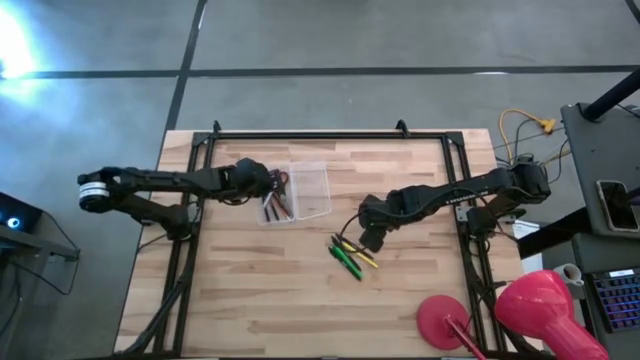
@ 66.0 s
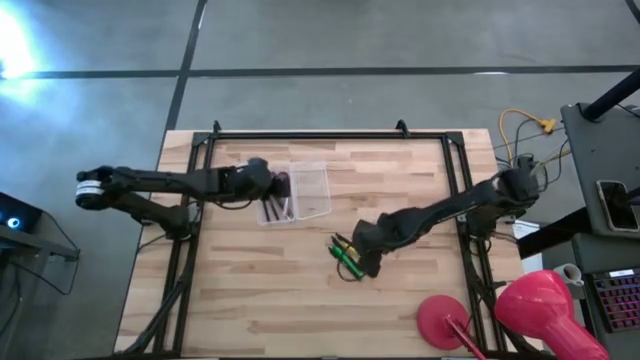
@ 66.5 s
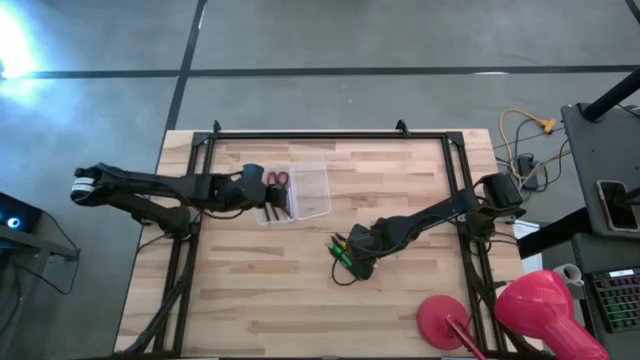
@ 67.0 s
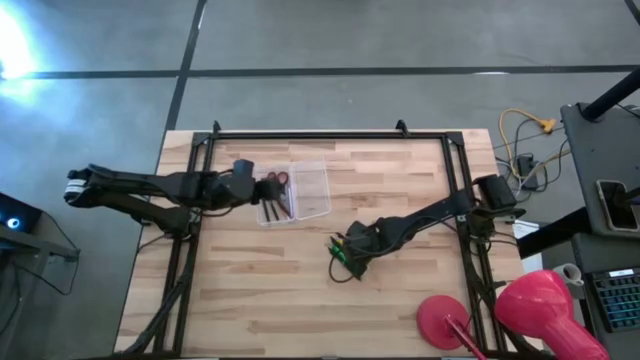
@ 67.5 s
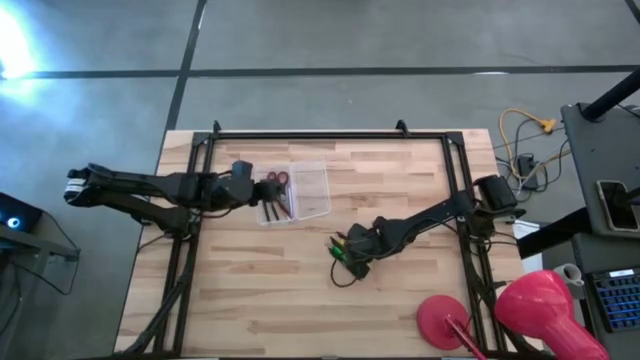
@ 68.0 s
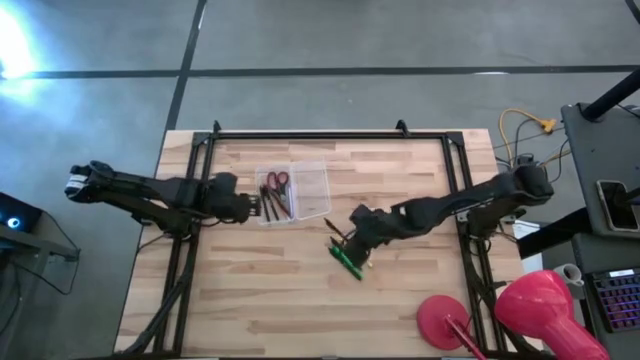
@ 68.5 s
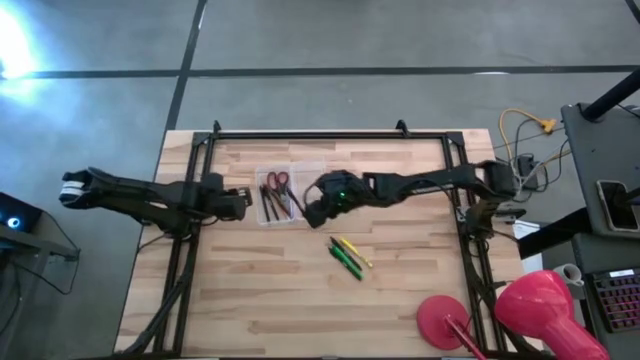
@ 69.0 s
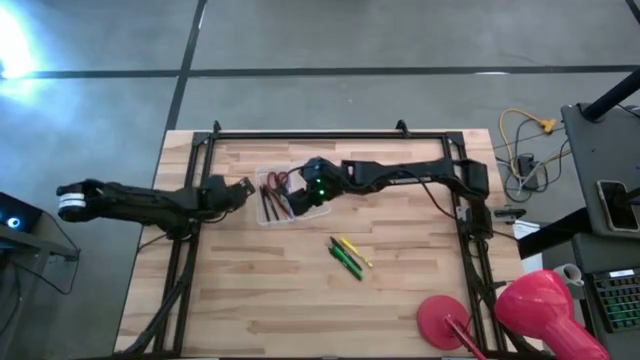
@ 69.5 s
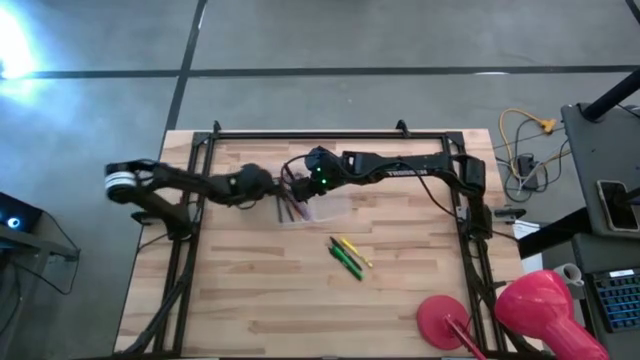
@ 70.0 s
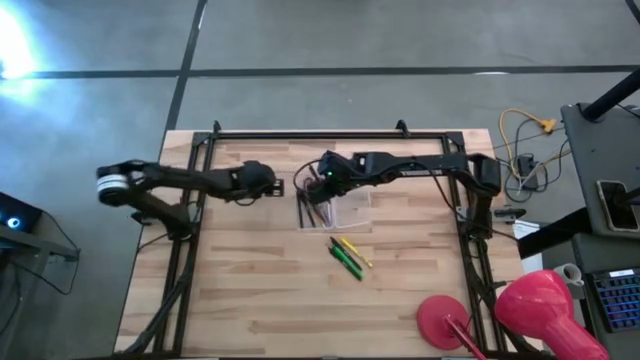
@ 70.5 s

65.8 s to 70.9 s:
Task: Pick & place school supplies into a supply box
Put the black pen into the transparent supply box

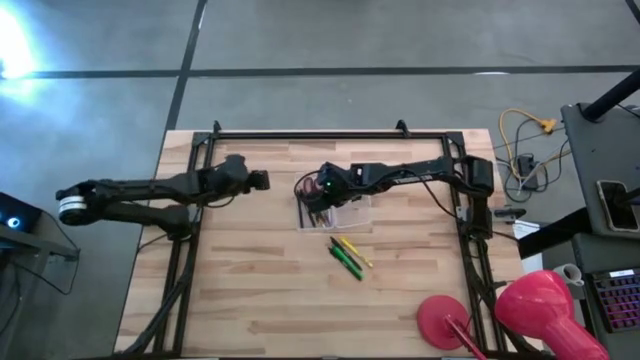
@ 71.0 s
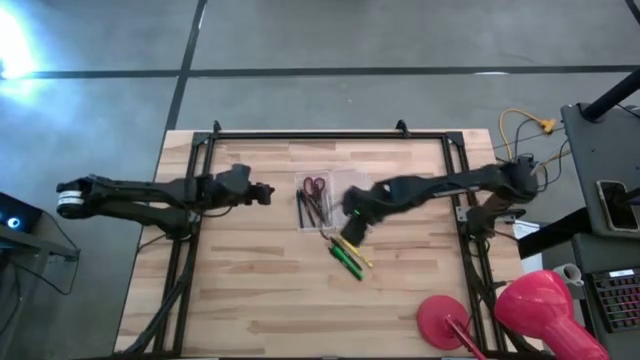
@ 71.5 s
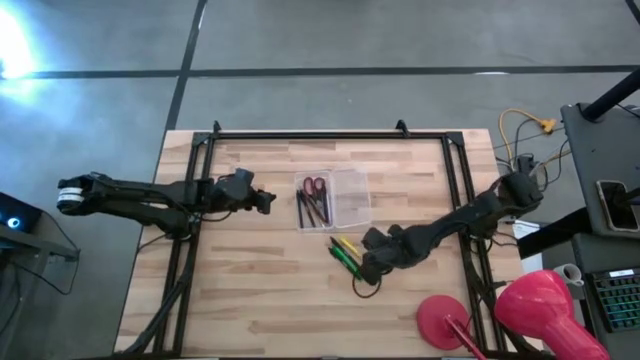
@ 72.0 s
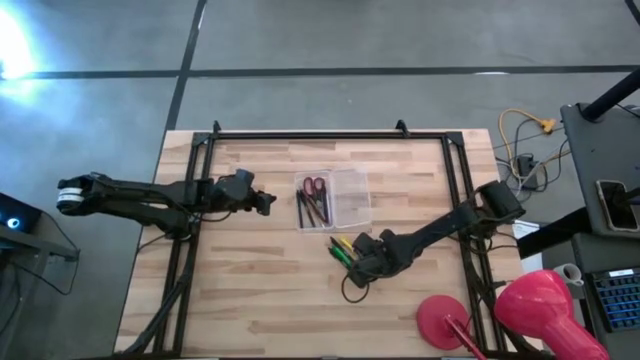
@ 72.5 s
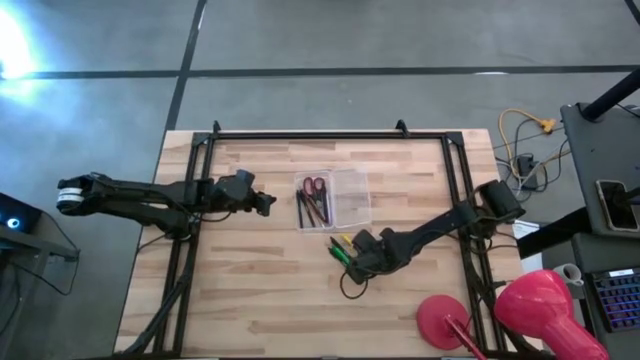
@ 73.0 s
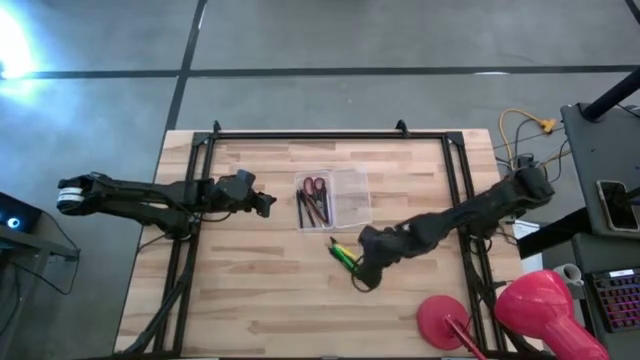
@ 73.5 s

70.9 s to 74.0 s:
Put the yellow pen into the transparent supply box

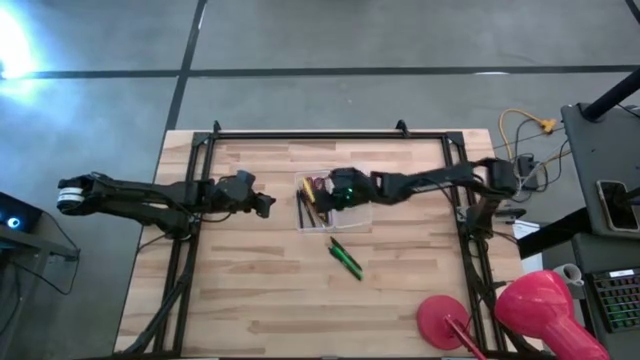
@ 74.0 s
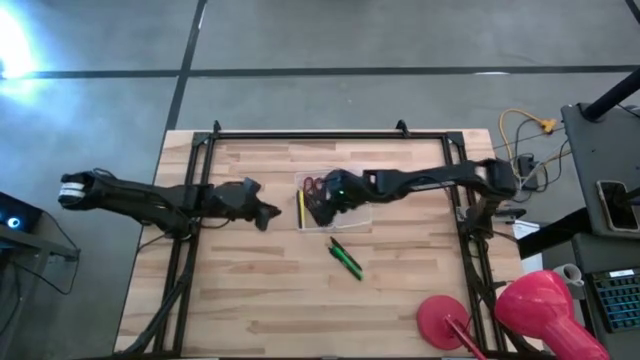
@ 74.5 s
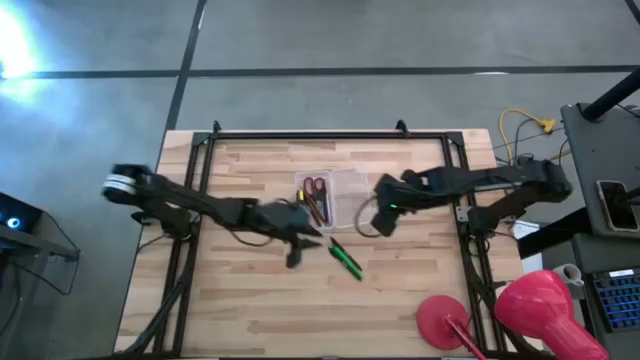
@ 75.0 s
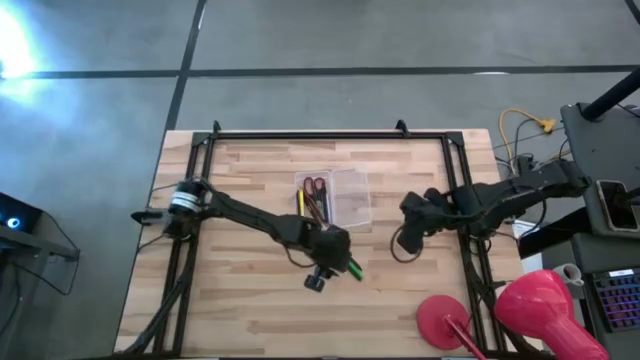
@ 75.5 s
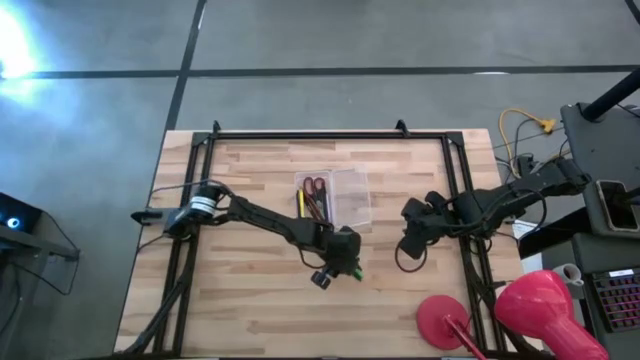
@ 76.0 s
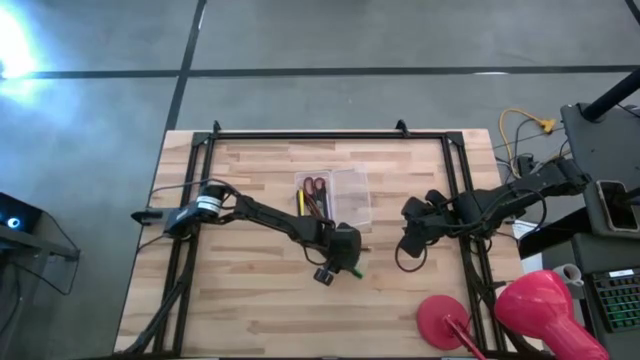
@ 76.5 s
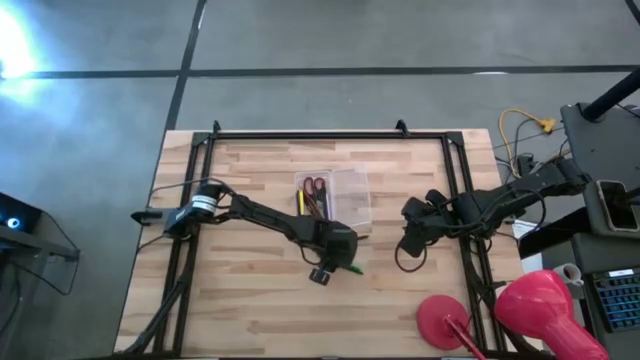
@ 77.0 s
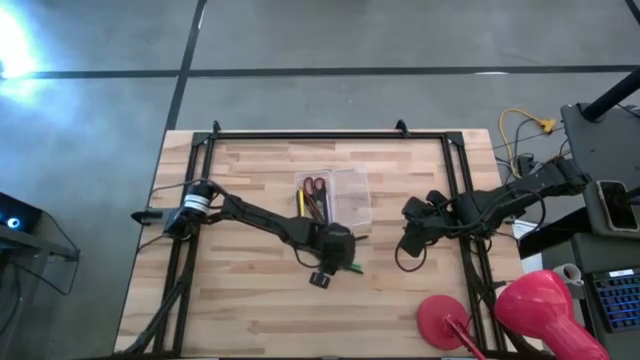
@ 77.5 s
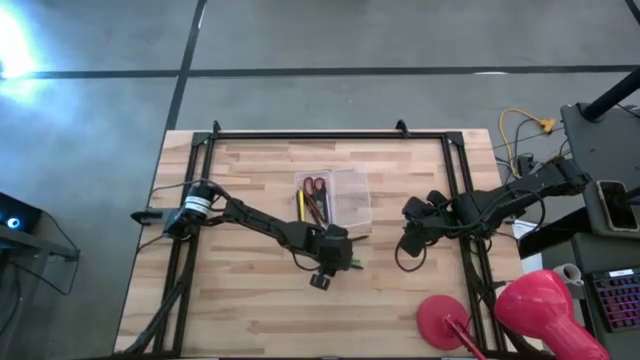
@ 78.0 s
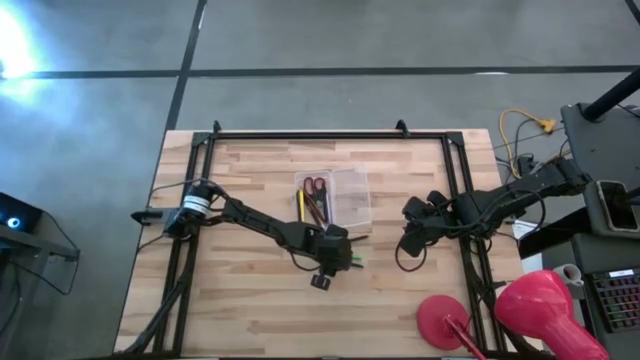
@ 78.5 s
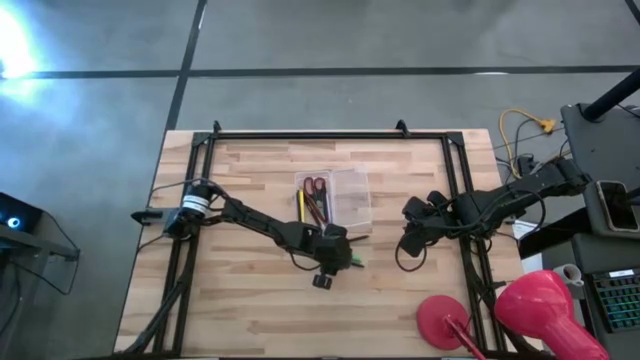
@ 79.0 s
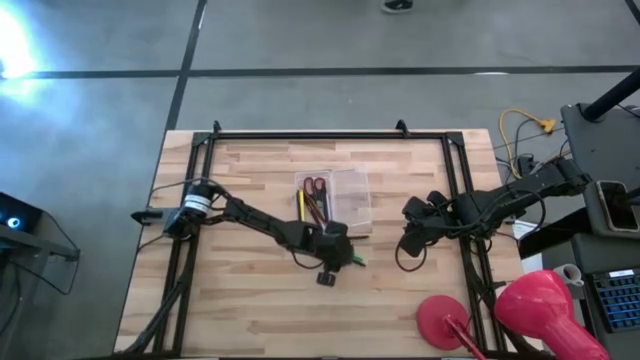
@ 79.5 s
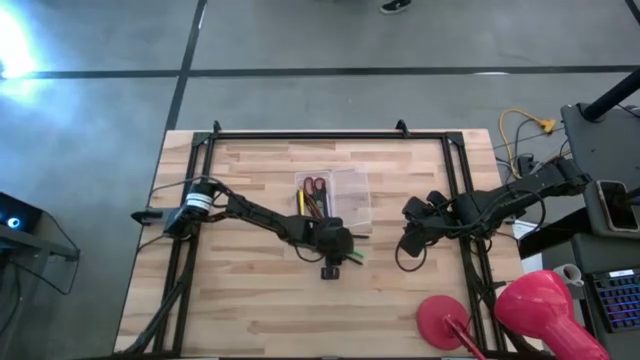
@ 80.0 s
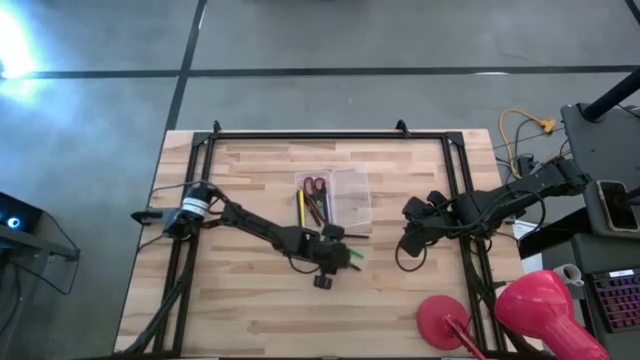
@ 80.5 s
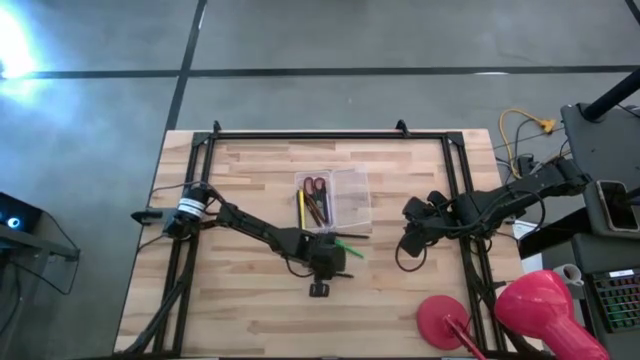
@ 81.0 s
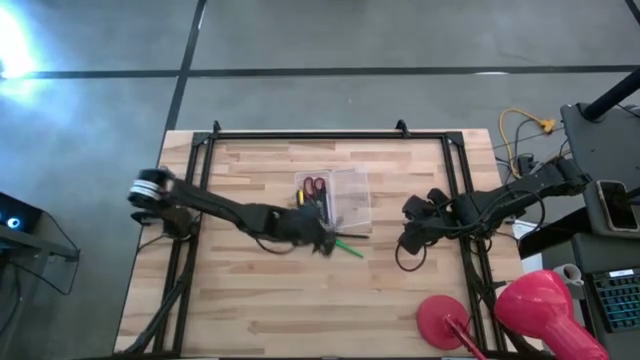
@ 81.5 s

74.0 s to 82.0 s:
Put the black pen into the transparent supply box

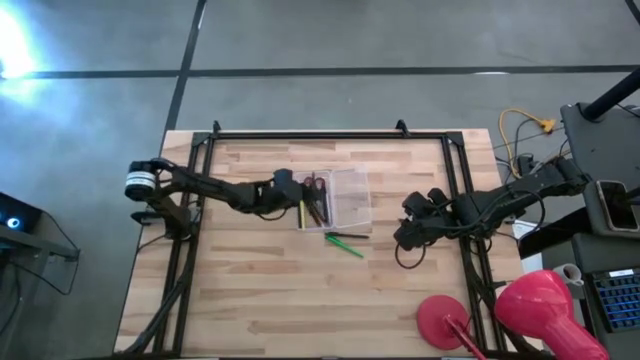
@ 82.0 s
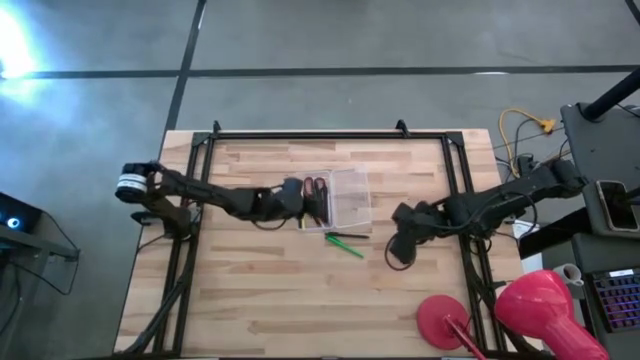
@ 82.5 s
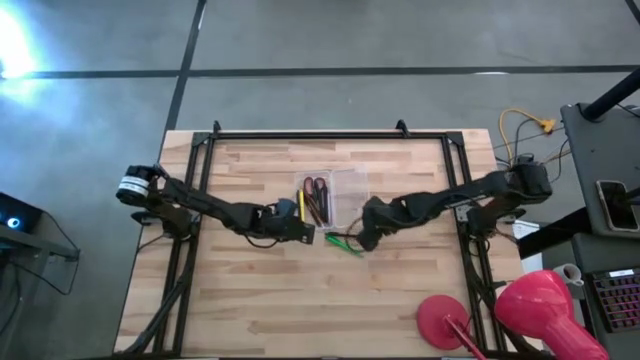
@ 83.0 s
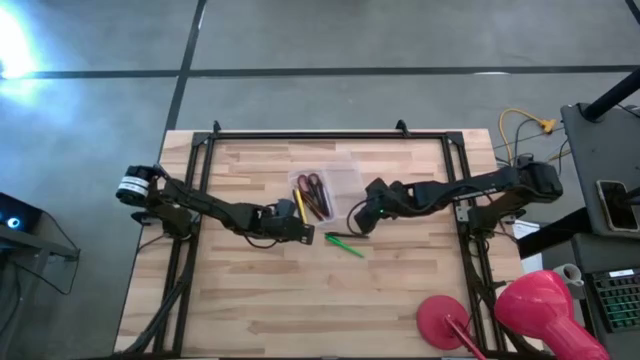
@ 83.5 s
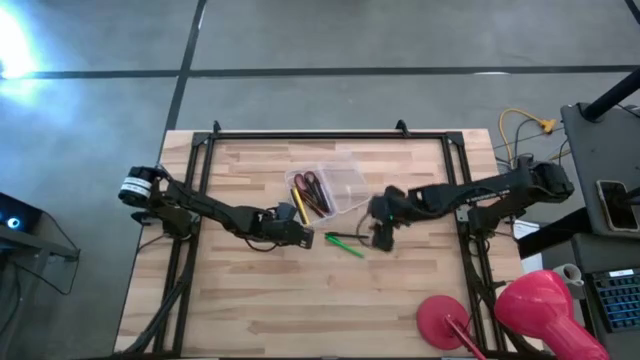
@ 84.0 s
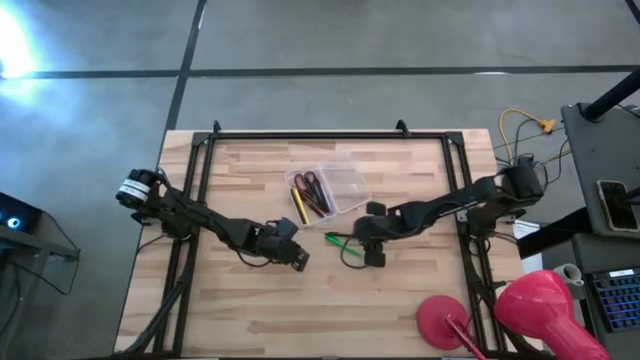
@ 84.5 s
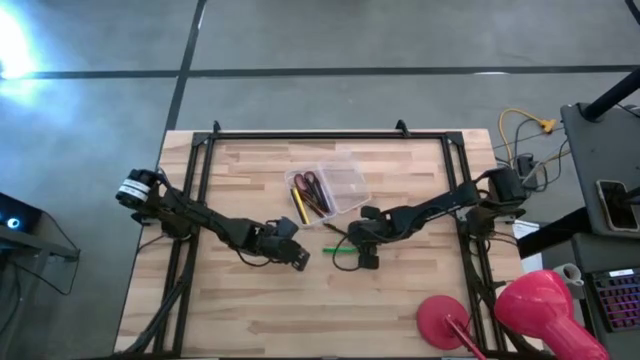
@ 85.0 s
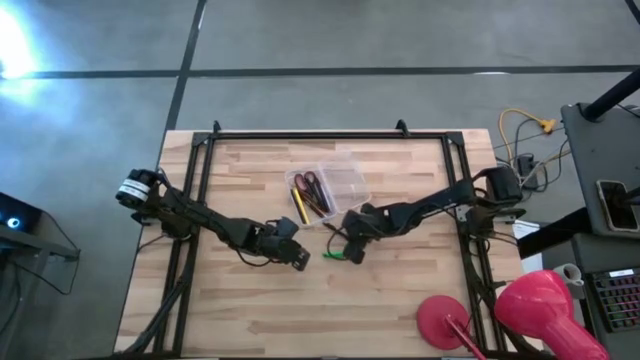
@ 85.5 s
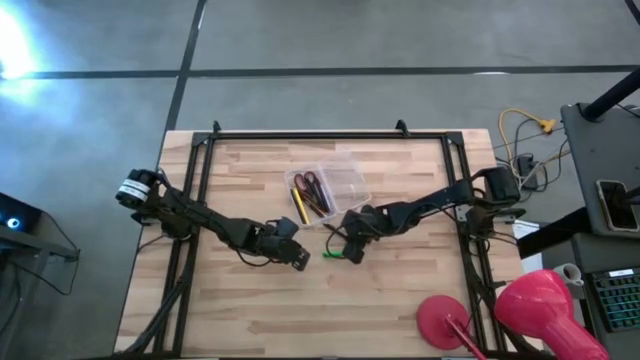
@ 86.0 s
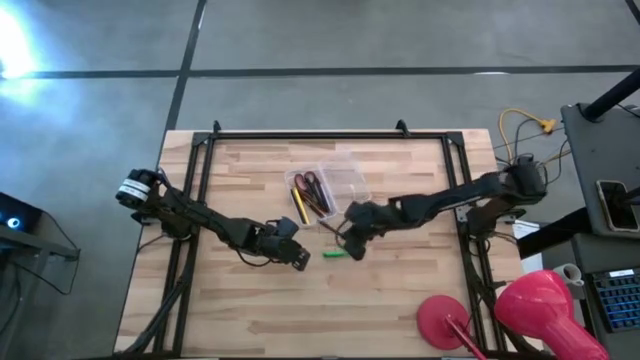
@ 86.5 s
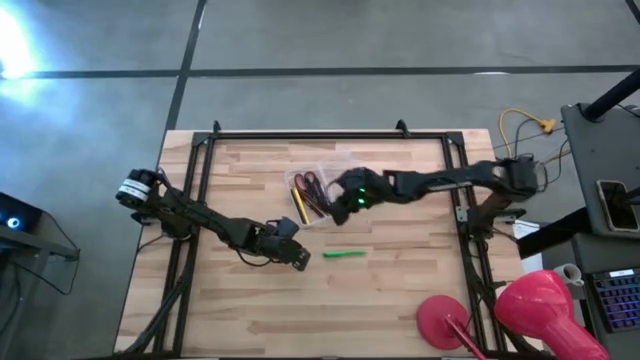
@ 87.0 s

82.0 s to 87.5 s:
Put the black pen into the transparent supply box
